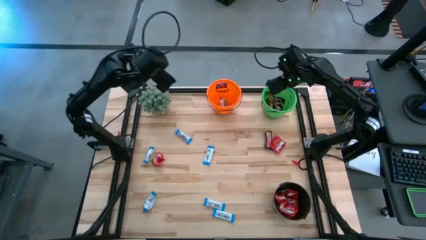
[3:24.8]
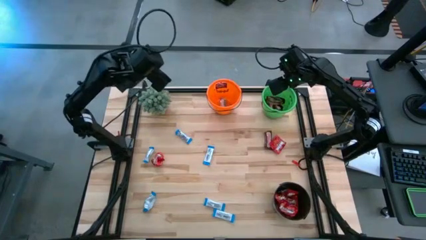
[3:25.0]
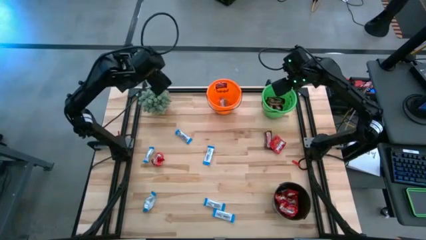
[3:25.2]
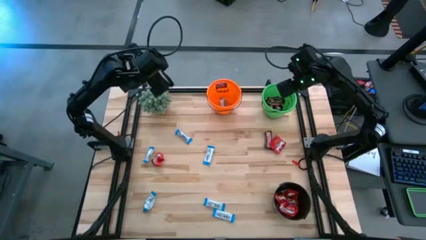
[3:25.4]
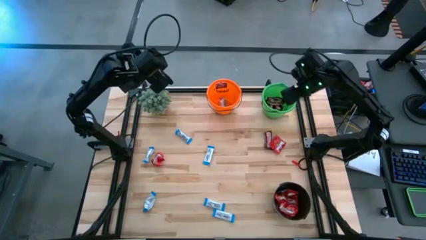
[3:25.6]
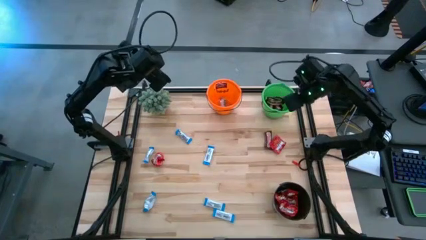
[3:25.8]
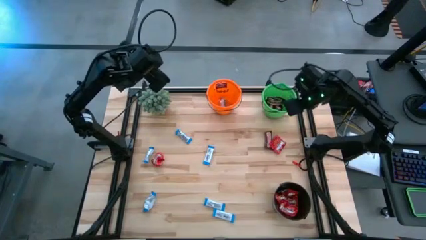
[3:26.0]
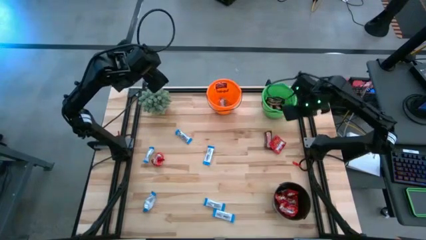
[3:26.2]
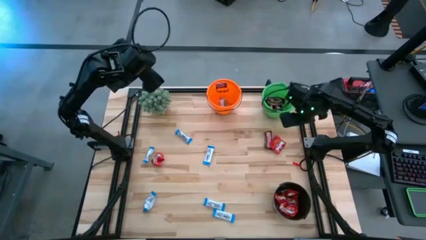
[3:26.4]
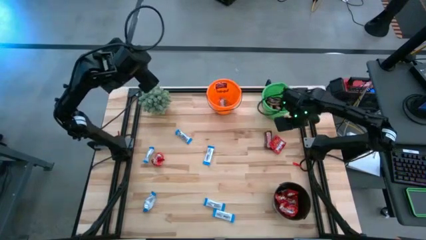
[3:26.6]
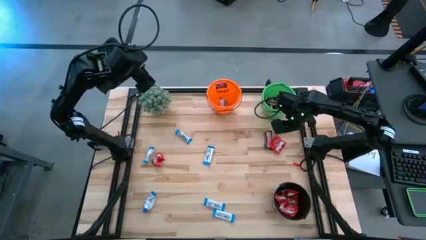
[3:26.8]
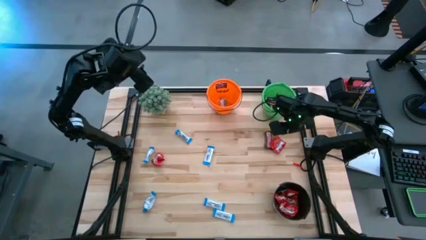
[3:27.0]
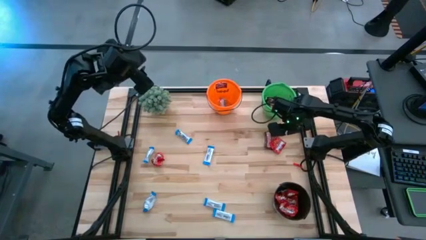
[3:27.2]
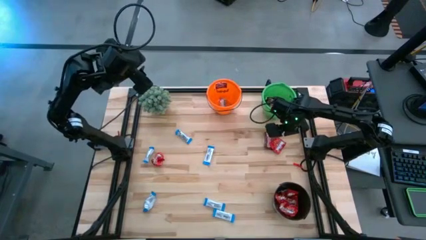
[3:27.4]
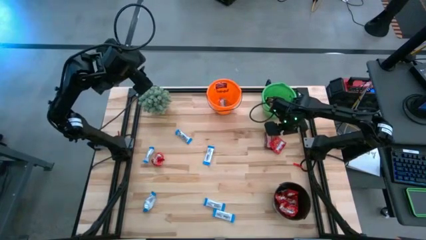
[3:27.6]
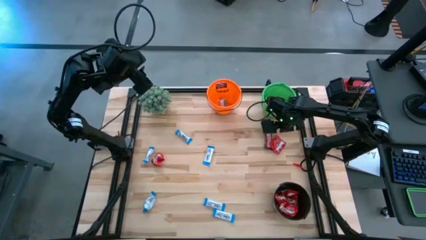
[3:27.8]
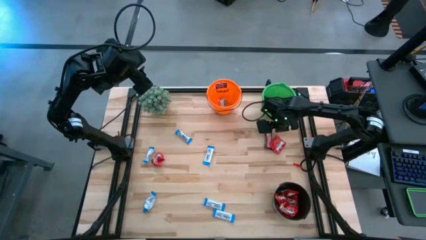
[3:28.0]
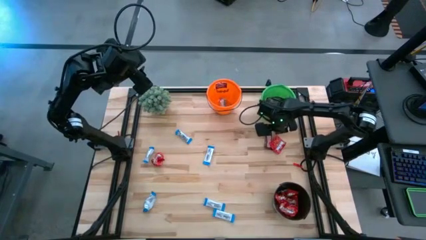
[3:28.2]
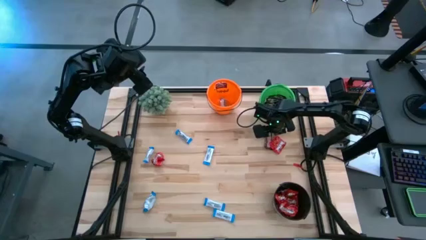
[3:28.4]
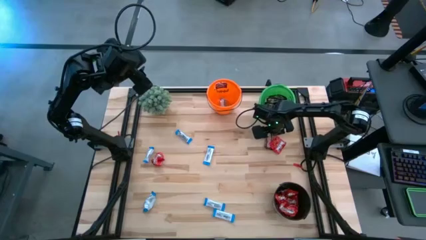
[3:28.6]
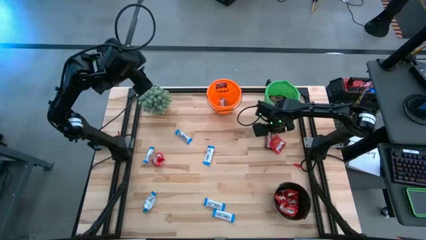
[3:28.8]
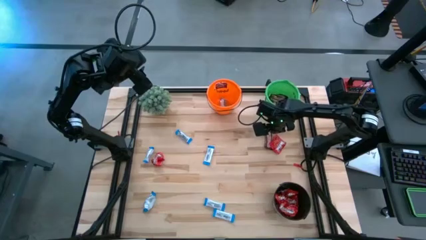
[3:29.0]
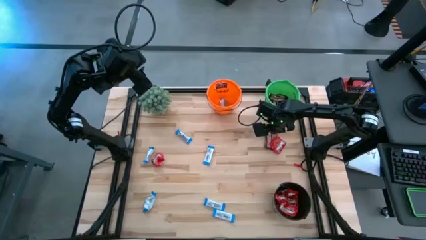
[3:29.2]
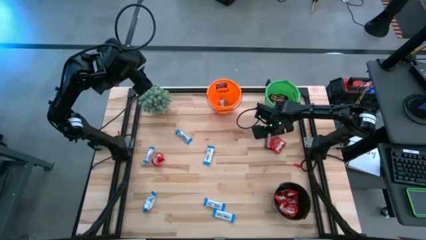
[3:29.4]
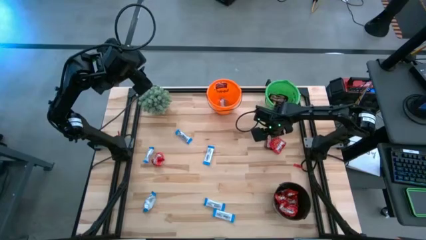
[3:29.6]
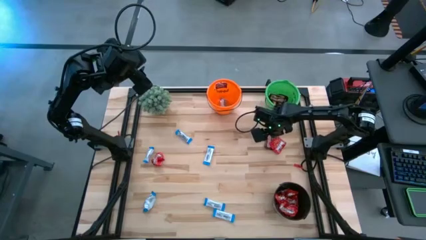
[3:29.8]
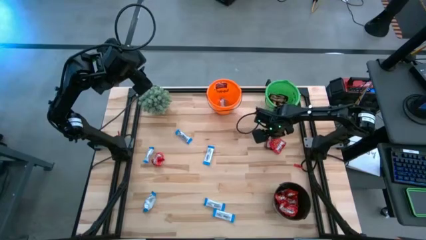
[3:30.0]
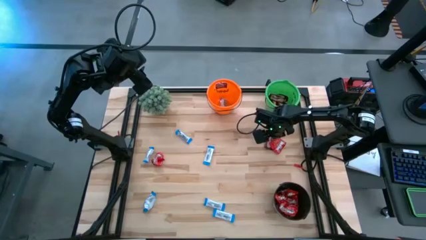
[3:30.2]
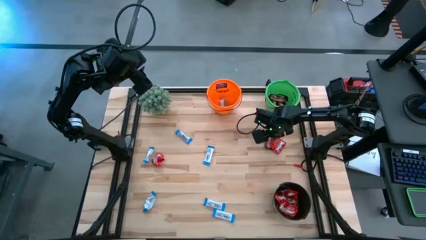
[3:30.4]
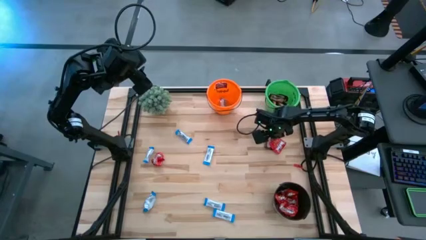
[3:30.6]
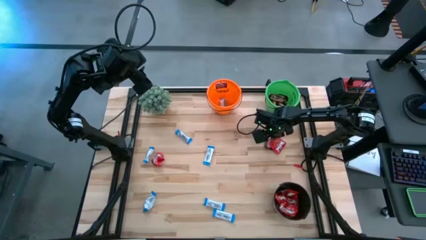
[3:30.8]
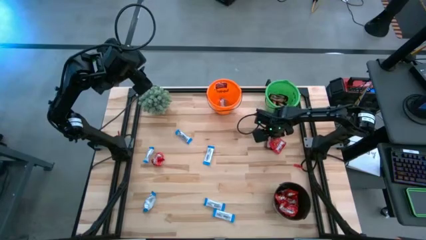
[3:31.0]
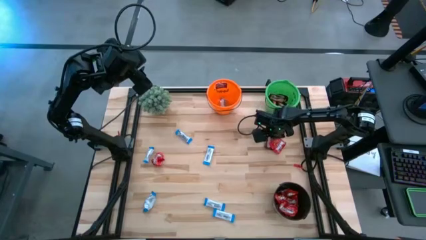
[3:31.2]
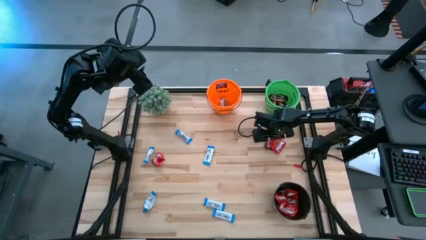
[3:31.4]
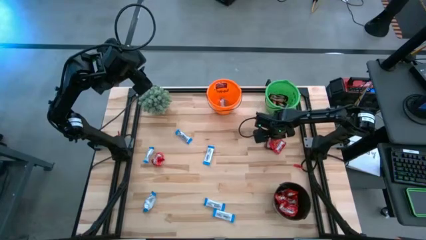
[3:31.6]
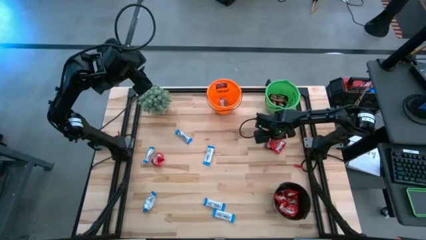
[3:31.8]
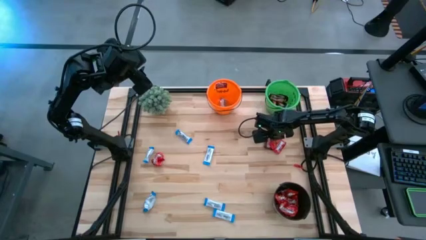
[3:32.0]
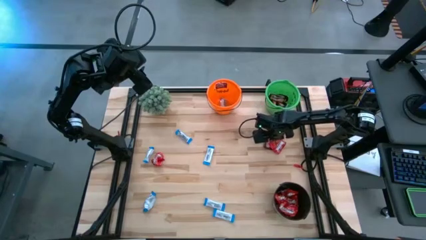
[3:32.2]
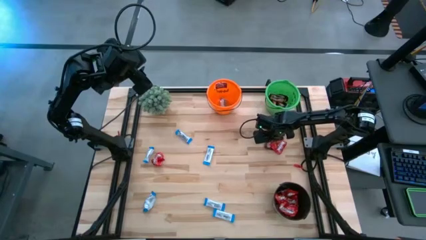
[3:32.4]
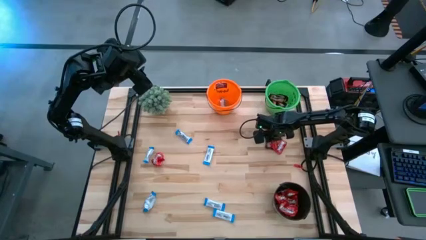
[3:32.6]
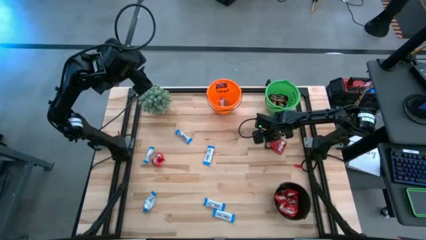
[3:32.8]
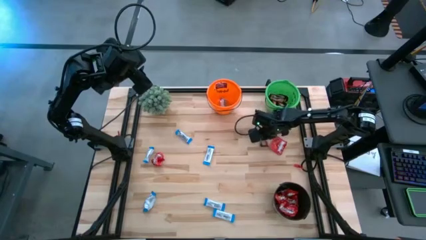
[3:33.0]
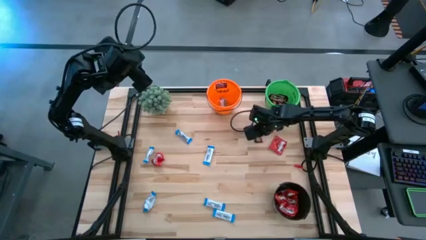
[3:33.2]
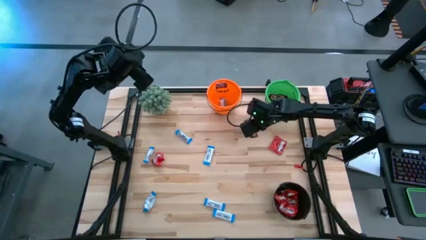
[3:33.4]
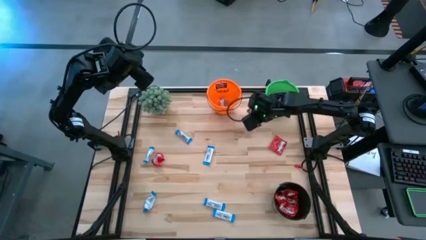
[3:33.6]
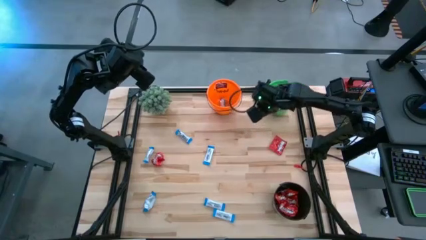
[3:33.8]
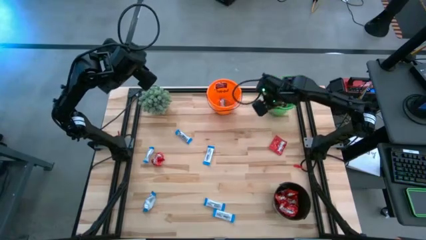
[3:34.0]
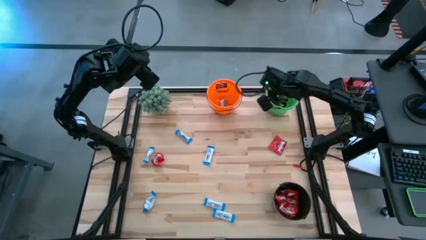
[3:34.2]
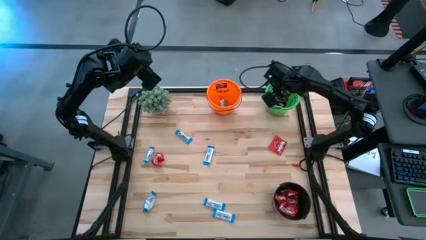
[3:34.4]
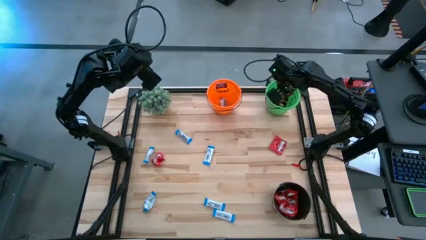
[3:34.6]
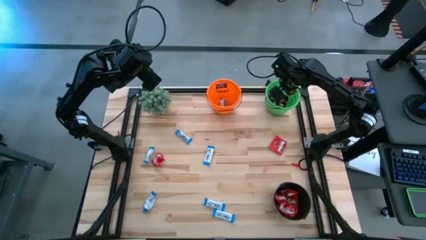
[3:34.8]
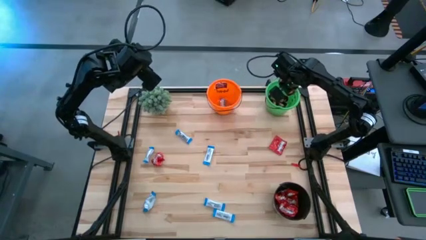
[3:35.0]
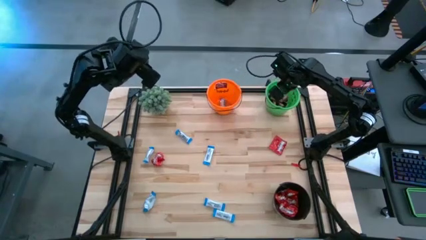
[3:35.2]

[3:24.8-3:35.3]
Task: Organize candy in baskets
Put the brown chocolate into the green bucket

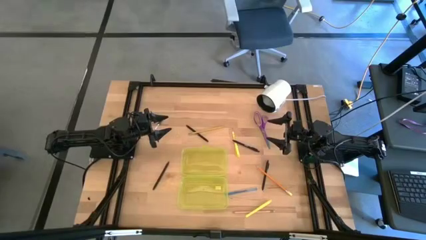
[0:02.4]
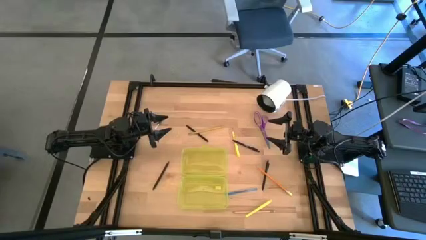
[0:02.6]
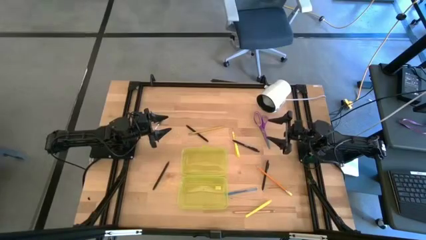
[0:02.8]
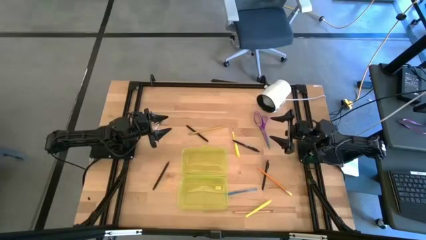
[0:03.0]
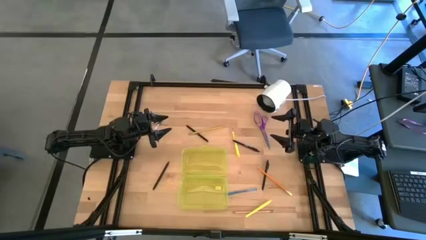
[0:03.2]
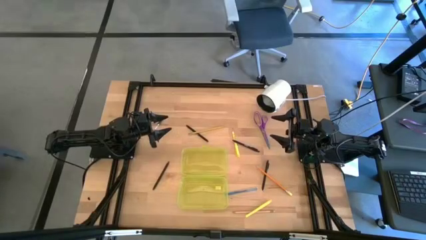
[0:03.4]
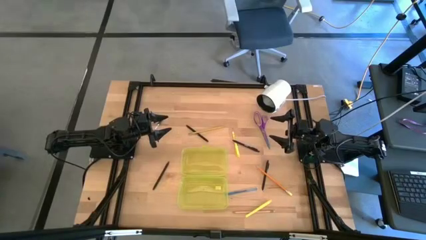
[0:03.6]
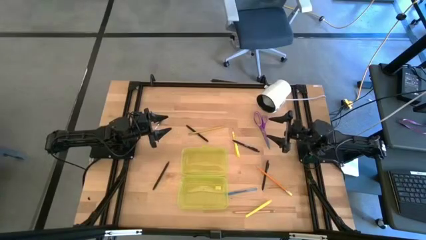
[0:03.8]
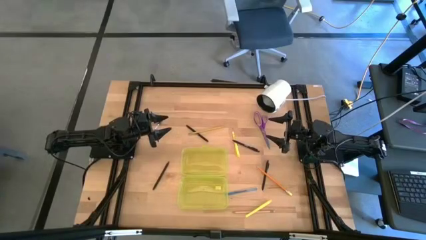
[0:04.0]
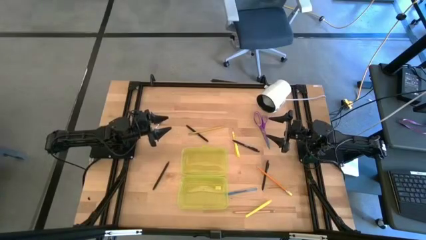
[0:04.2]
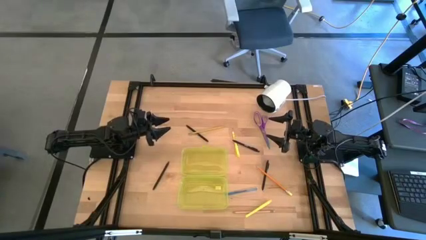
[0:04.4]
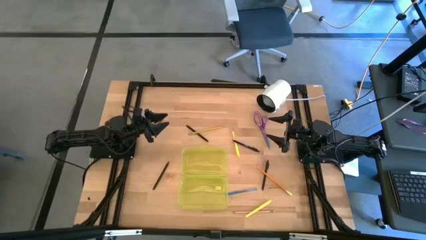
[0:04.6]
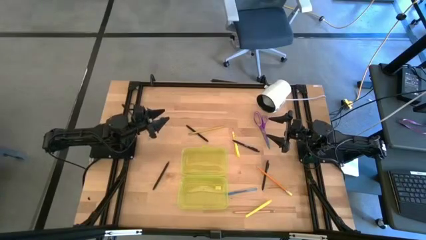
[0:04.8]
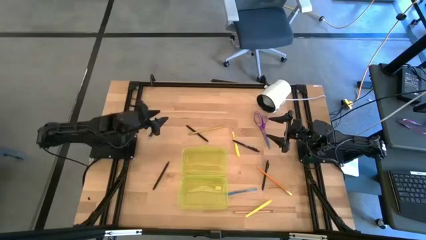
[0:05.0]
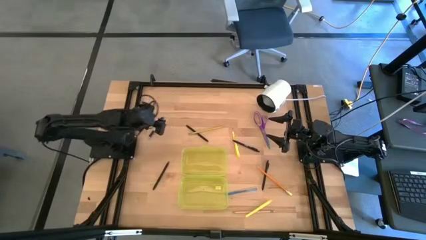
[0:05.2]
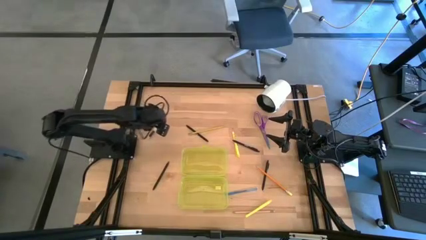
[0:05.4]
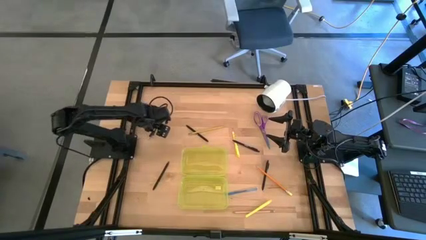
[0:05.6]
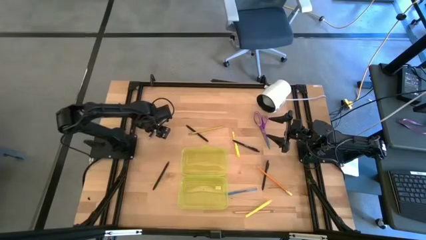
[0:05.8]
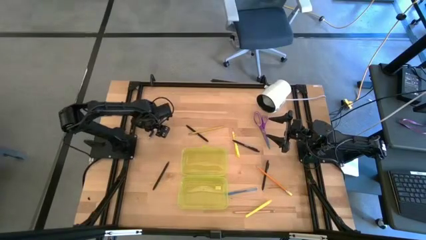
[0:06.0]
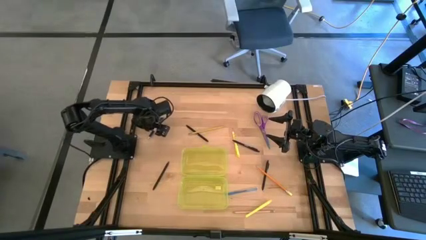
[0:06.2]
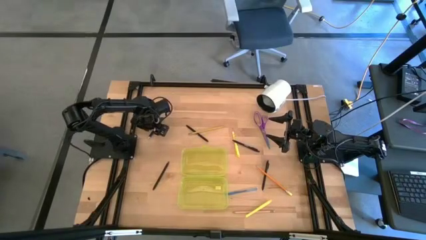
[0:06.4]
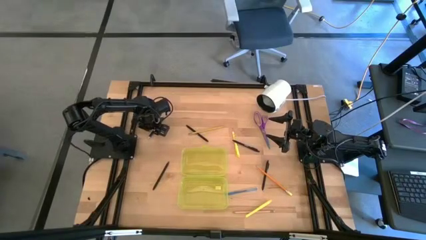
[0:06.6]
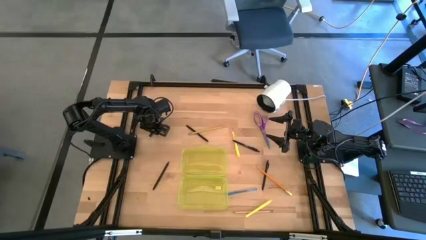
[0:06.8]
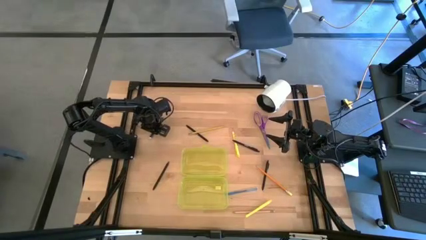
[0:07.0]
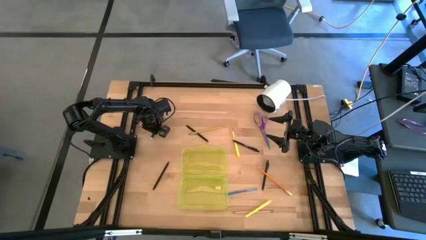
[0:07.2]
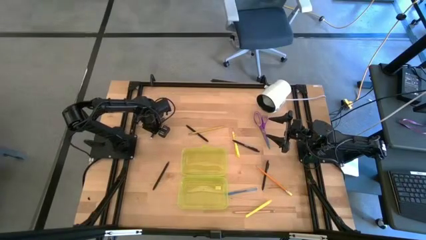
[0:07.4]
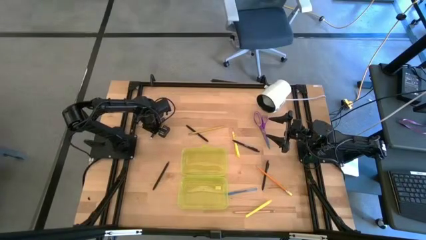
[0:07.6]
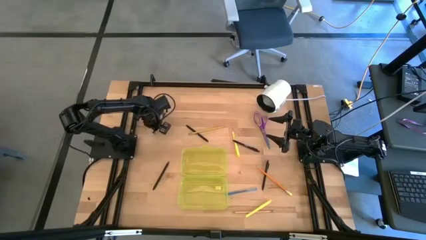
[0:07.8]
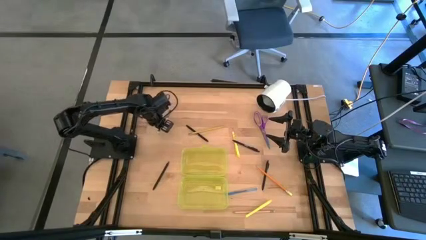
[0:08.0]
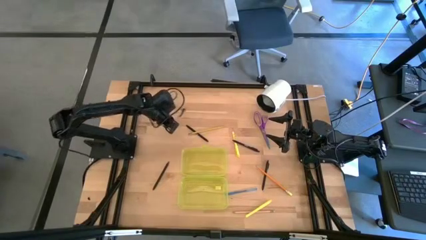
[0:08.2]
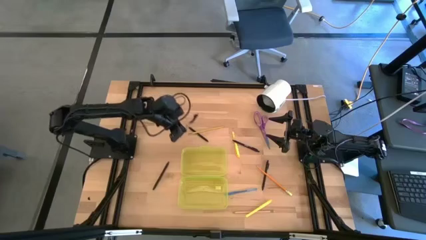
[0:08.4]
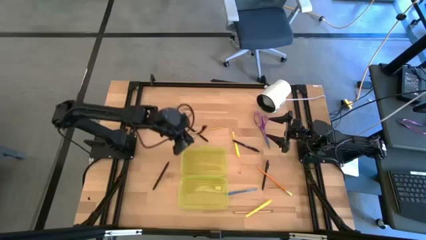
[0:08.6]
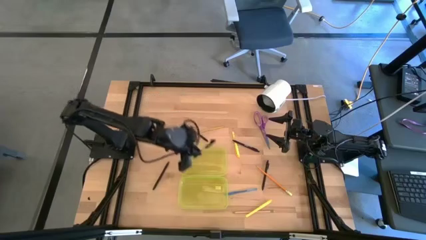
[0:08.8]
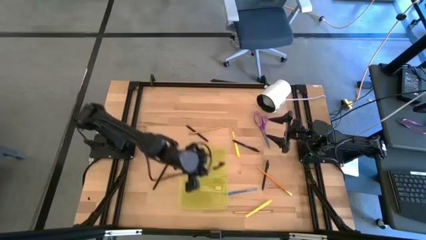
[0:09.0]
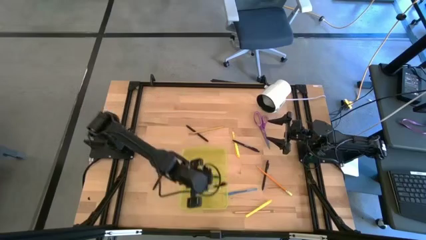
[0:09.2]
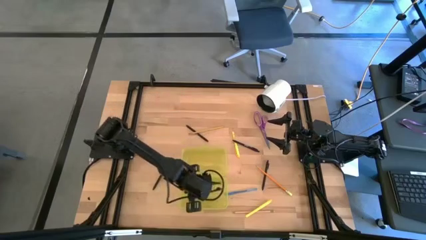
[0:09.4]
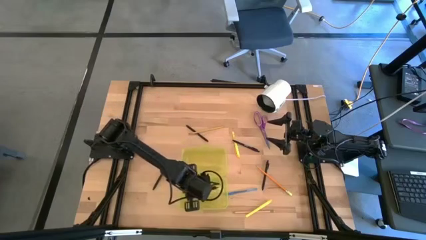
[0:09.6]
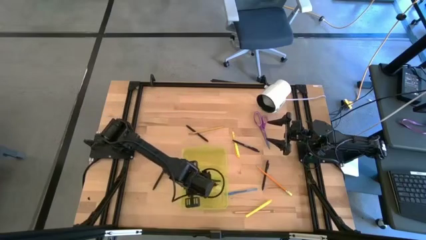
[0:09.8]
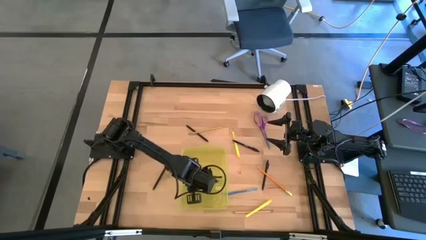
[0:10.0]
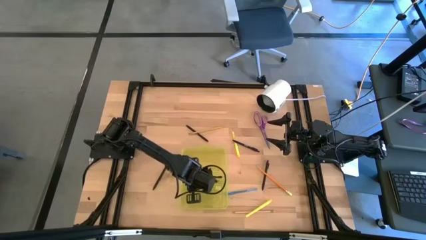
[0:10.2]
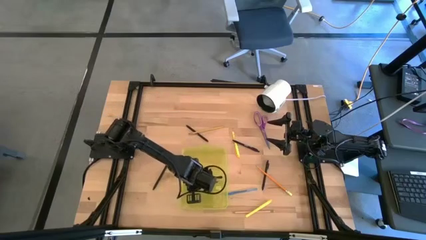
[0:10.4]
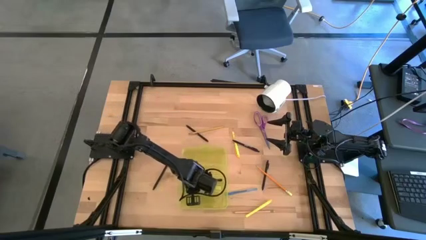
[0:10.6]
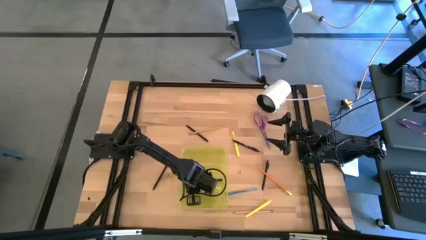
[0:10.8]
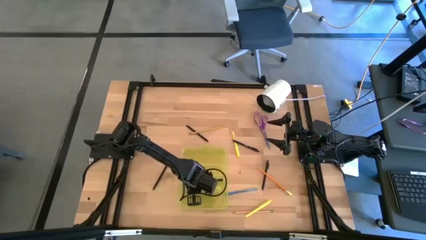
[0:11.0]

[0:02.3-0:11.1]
Task: Pick & place school supplies into a supply box
Put the black pen into the yellow supplies box
